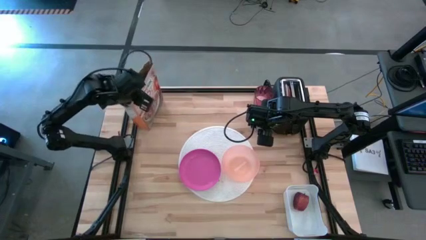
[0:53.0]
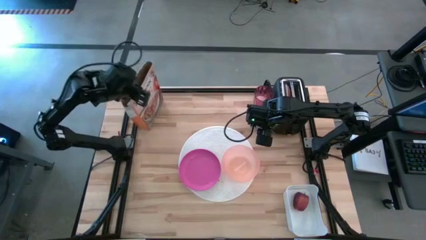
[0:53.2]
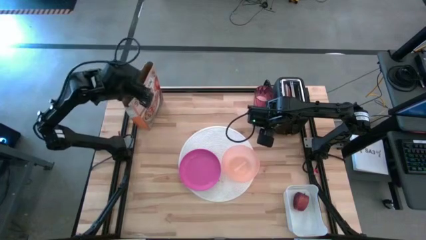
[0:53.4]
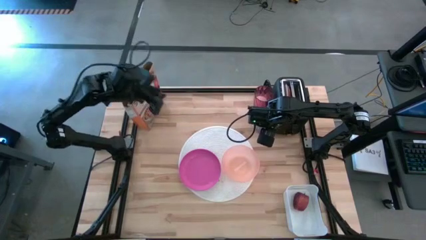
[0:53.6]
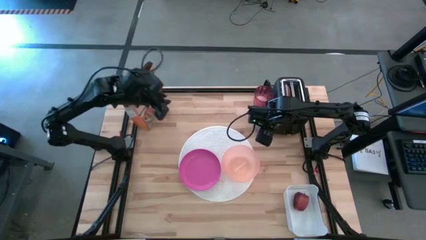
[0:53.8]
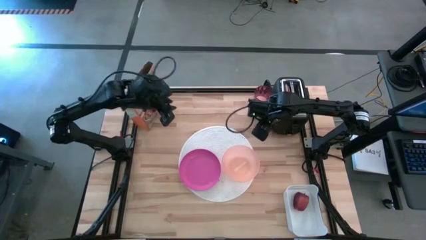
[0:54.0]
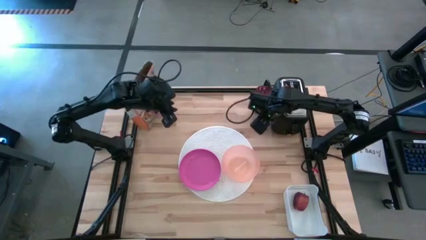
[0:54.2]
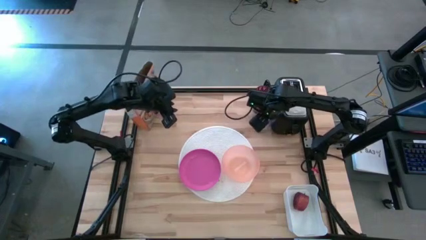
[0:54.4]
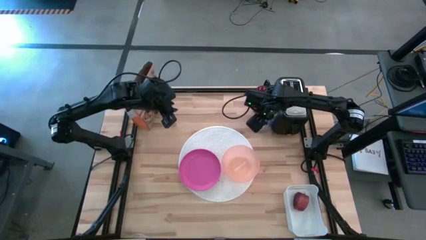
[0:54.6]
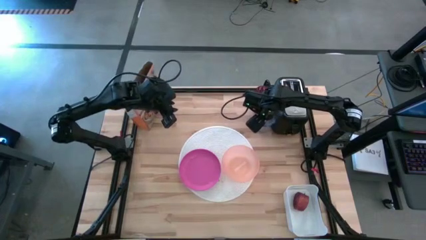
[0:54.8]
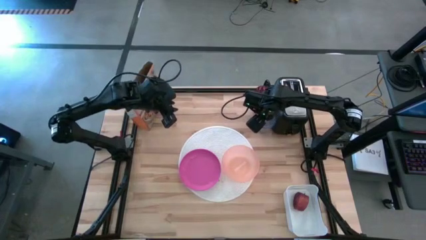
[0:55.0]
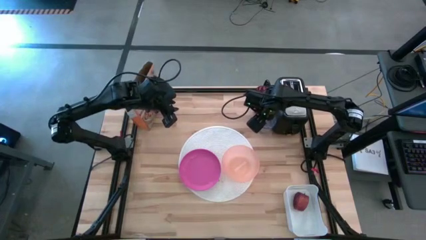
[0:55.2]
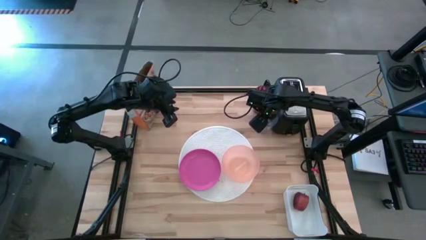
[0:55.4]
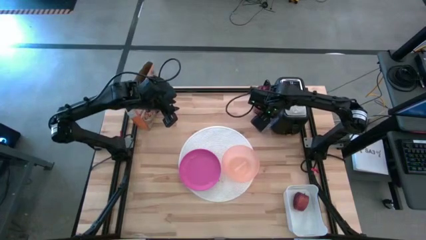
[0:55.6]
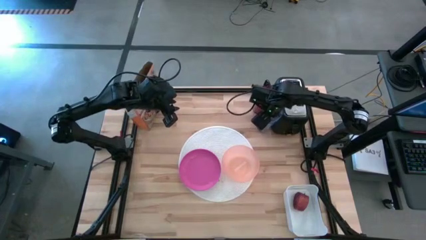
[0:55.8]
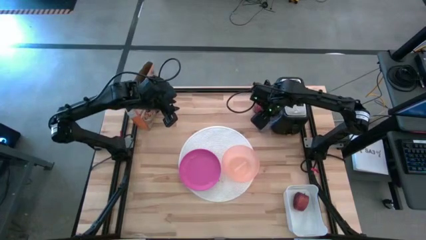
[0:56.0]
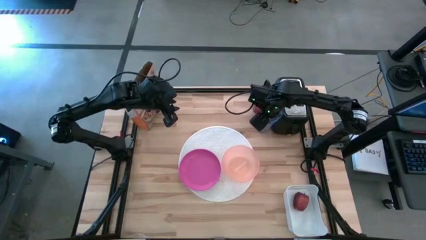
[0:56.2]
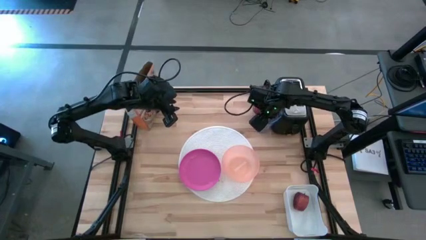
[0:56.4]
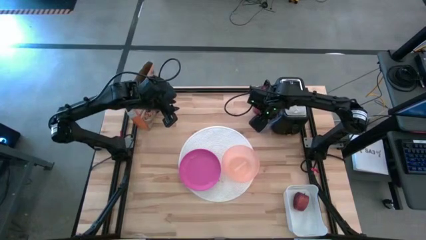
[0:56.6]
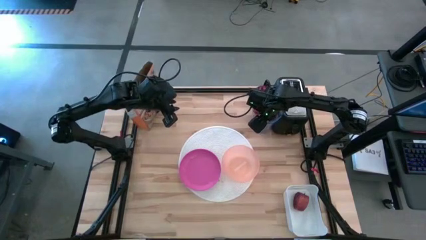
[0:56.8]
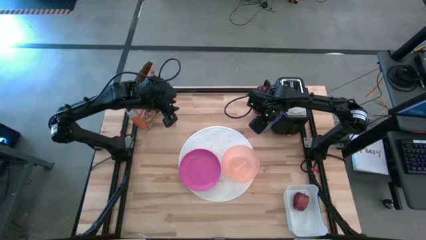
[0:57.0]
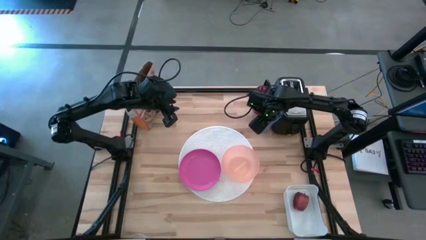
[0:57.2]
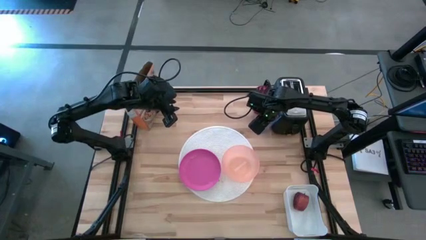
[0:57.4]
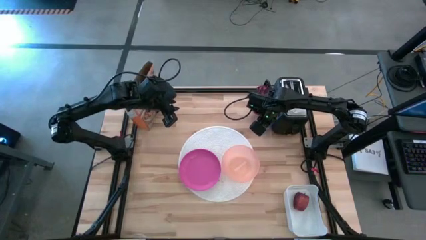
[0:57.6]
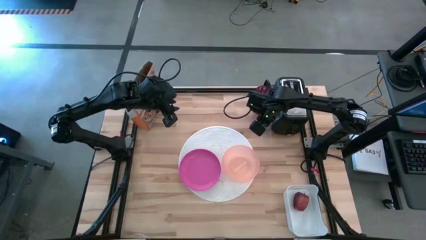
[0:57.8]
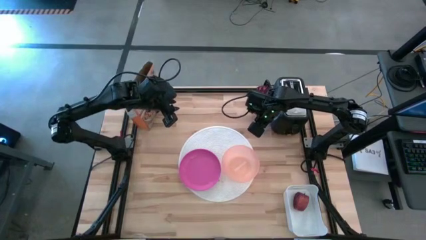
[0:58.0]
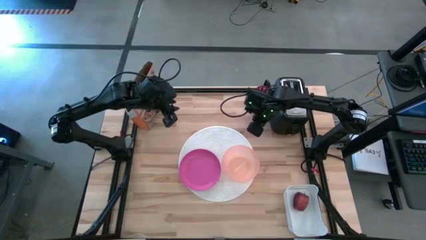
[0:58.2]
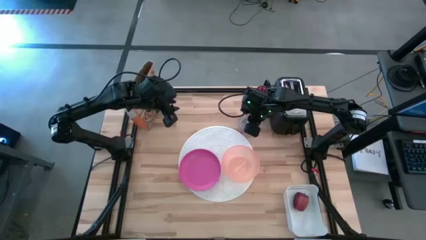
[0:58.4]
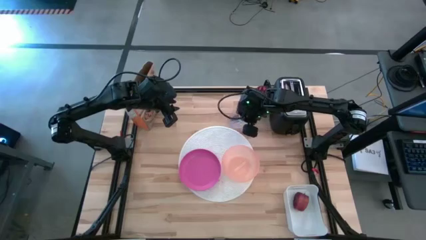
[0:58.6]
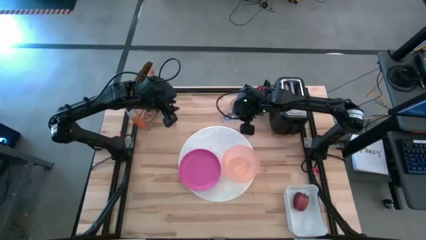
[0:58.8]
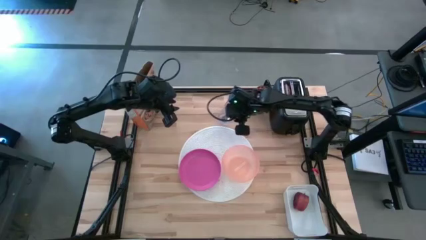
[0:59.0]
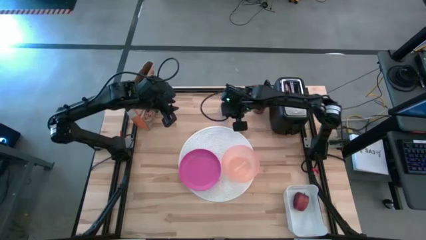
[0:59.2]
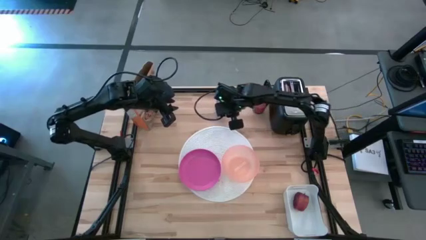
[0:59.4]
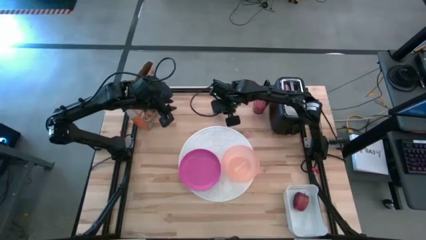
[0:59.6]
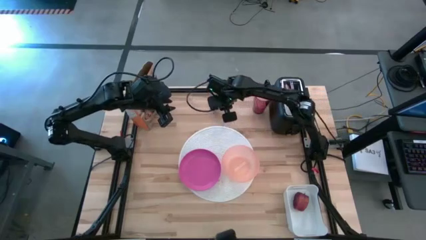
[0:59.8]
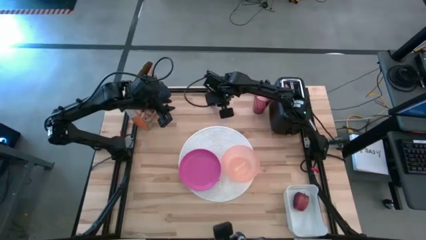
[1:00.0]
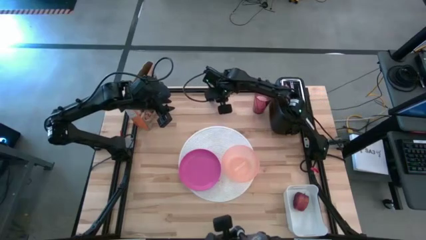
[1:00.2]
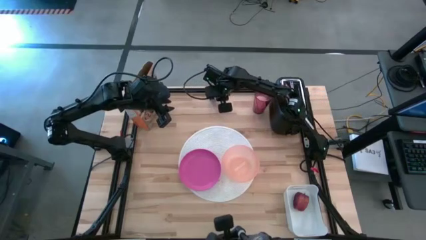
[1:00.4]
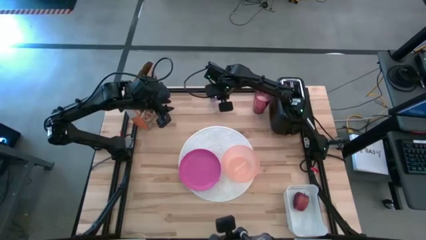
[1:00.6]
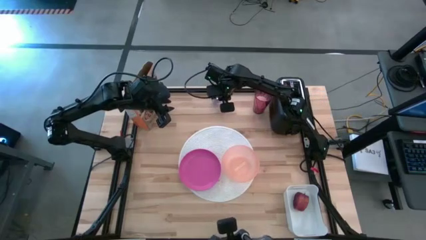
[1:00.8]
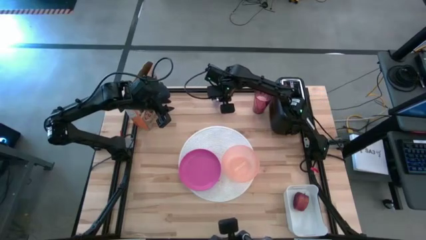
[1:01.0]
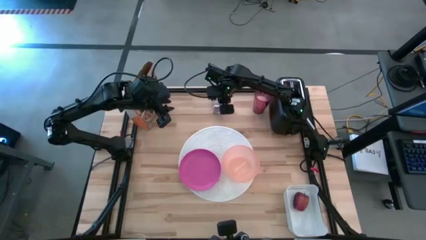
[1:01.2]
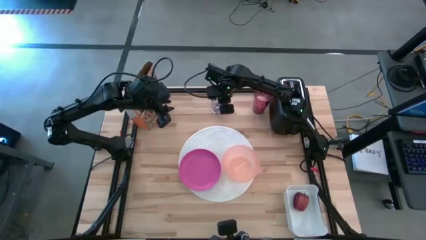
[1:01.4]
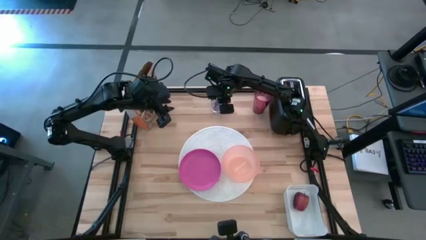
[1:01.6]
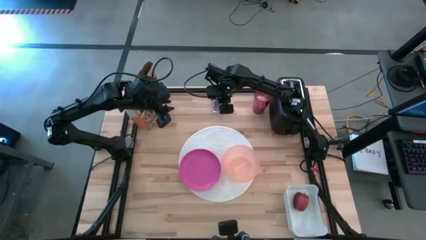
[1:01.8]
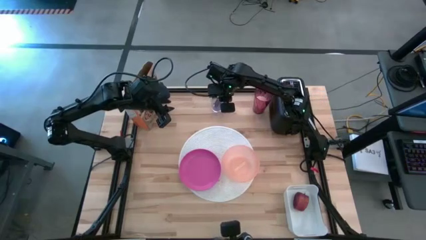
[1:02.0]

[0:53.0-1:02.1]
Task: Arrange a breakfast setting
Move the blue cup to the top center of the table

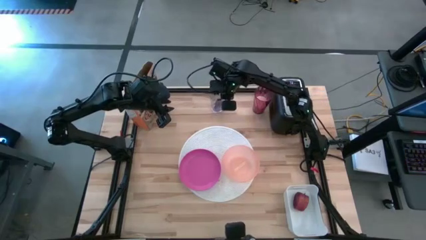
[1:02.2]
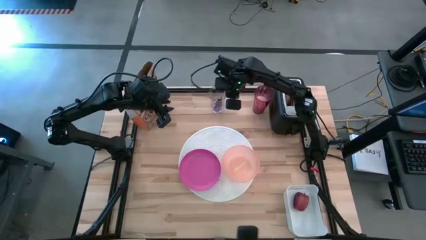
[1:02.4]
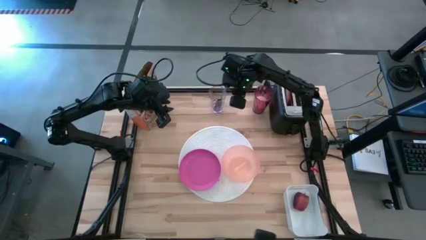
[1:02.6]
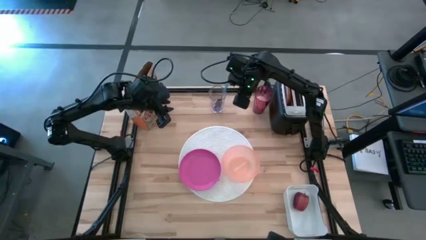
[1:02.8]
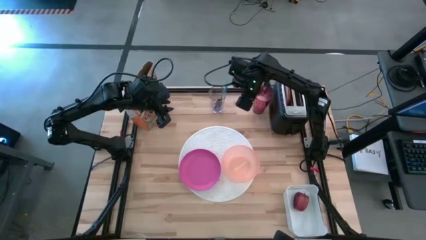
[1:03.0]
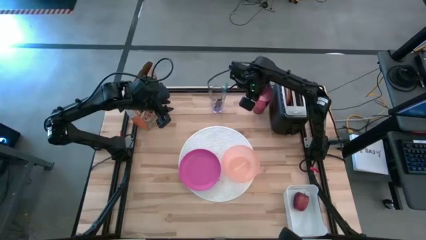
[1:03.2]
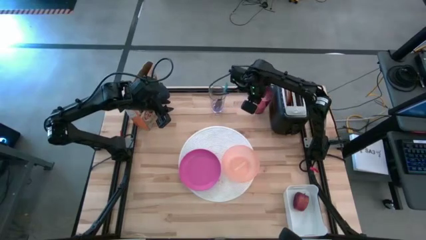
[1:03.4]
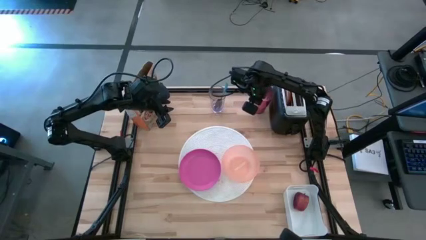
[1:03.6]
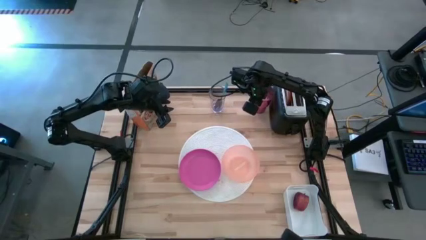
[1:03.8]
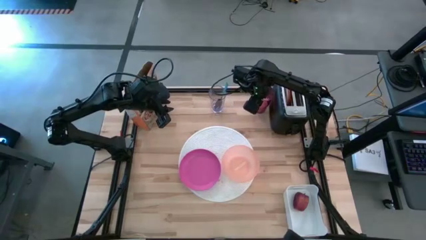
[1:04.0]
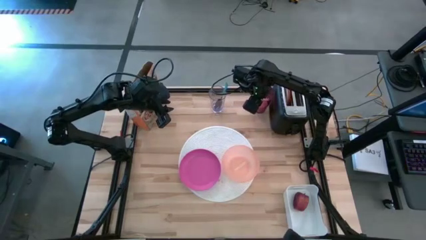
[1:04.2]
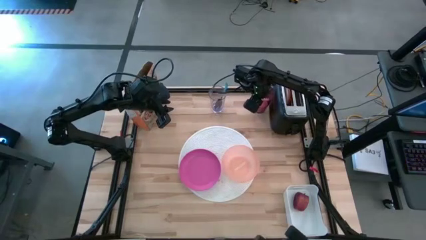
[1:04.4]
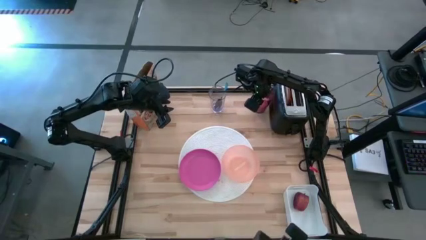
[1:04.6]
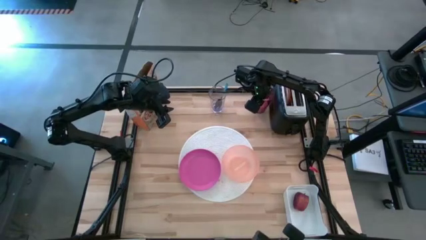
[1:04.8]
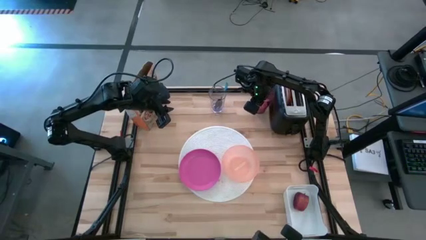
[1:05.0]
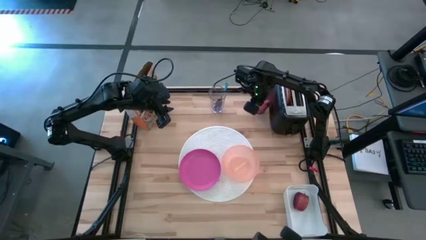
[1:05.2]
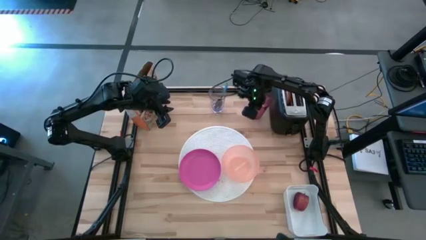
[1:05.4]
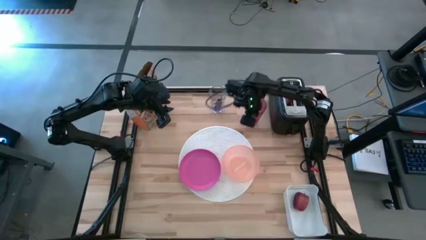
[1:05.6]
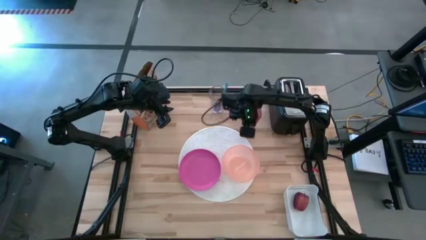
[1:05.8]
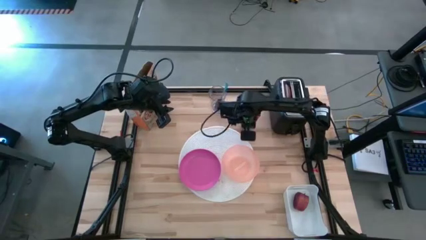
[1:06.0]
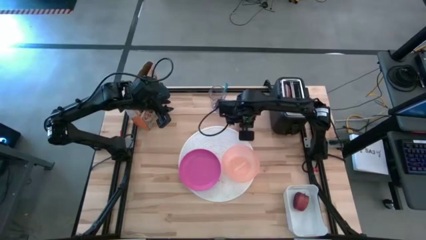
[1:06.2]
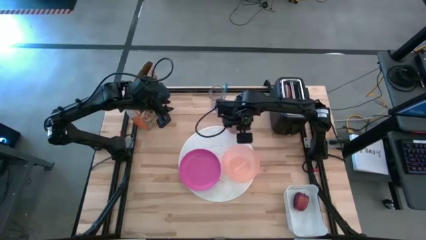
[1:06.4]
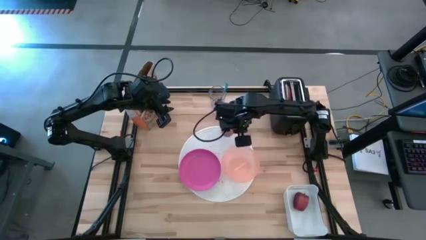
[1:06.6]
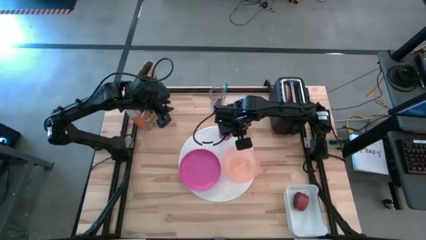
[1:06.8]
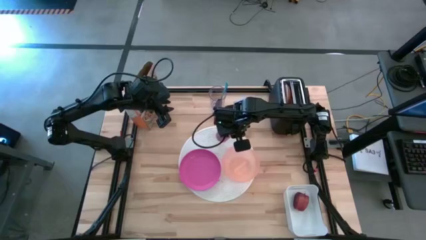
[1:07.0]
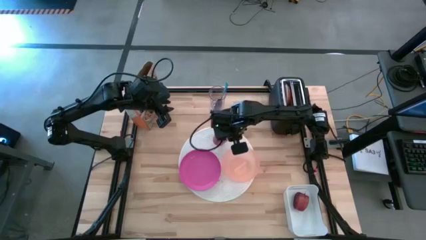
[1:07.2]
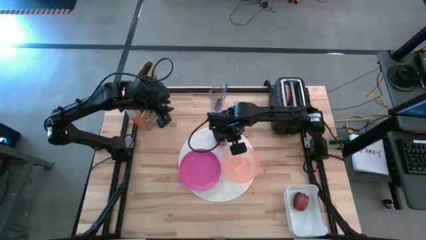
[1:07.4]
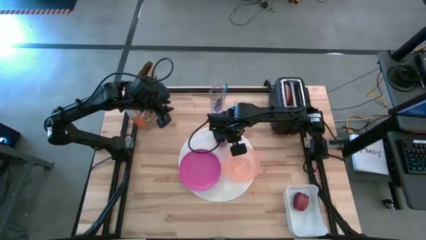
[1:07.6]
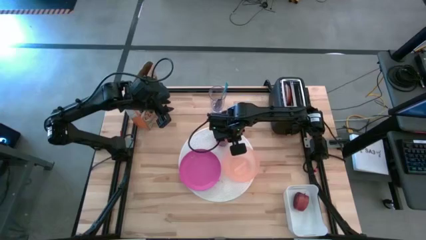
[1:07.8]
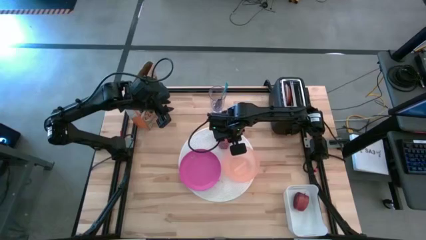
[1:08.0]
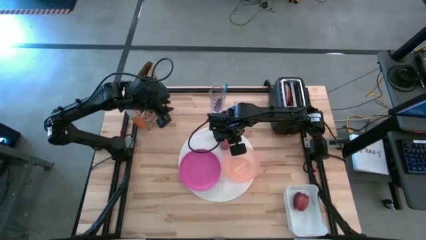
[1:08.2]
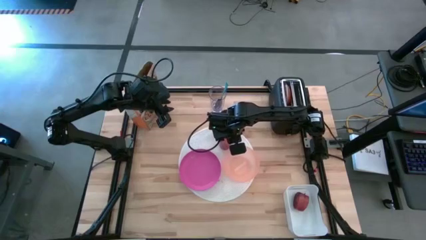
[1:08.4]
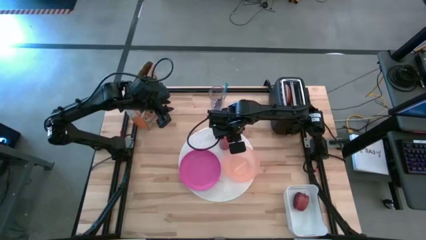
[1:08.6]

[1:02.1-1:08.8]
Put the red cup with rice inside on the white tablemat to the top right of the pink plate
